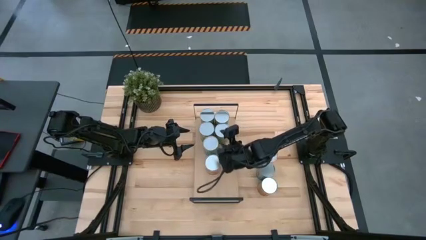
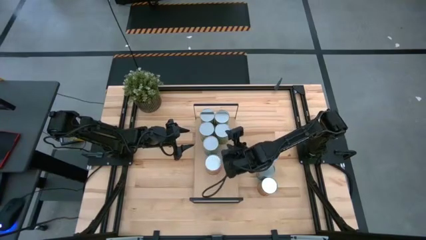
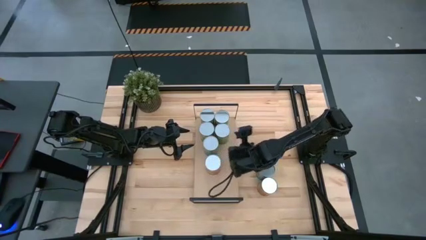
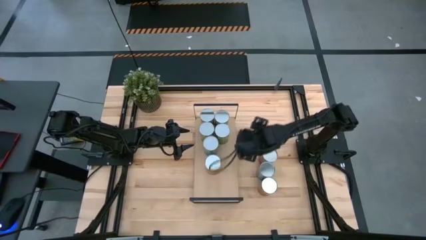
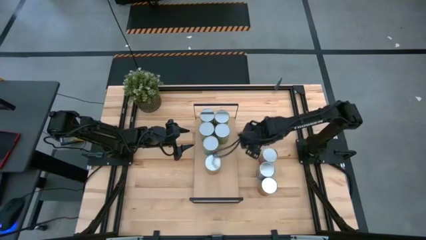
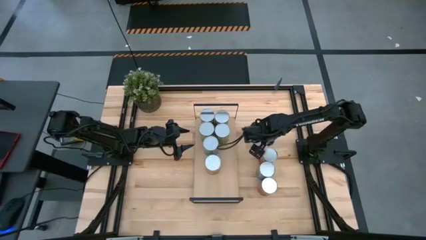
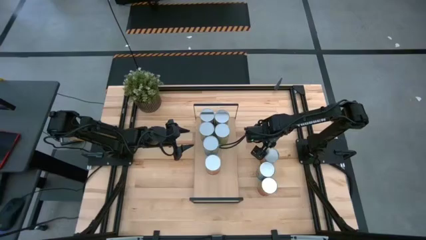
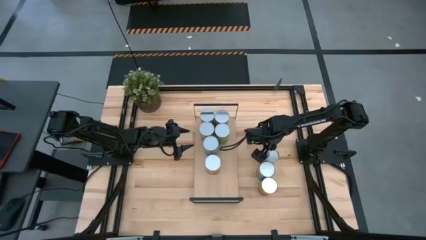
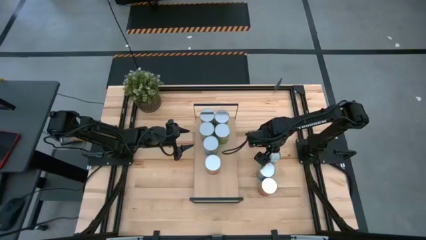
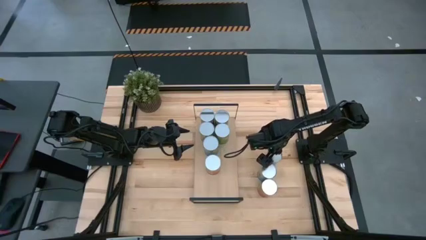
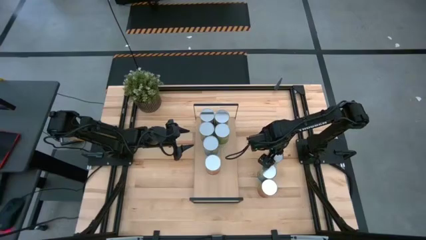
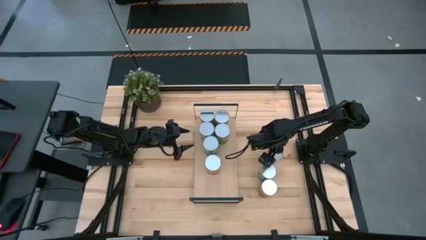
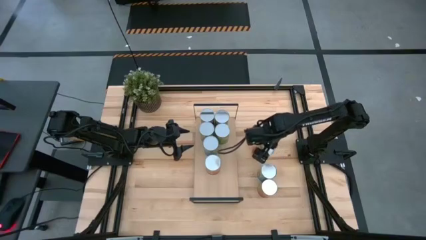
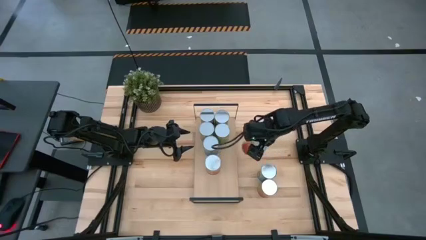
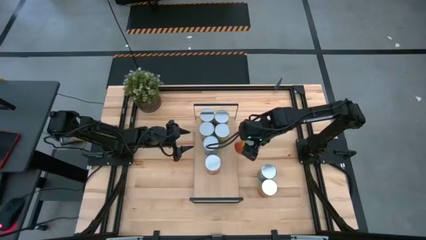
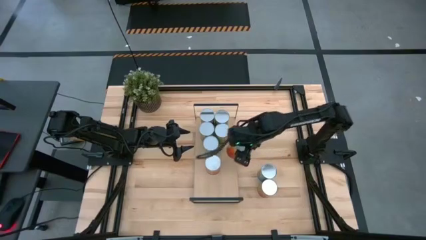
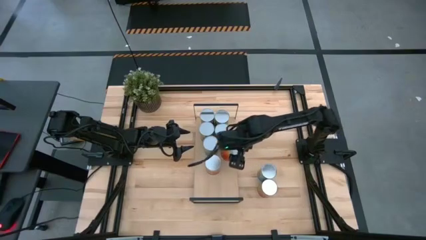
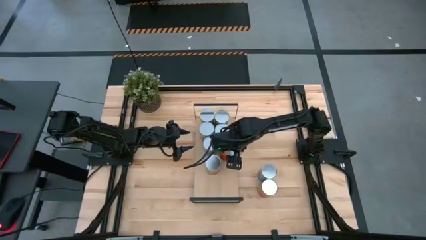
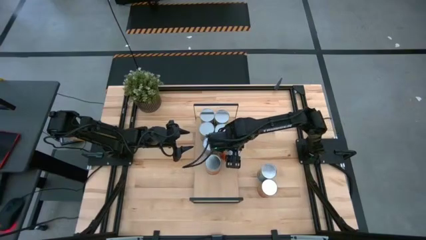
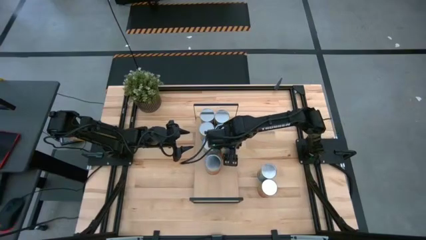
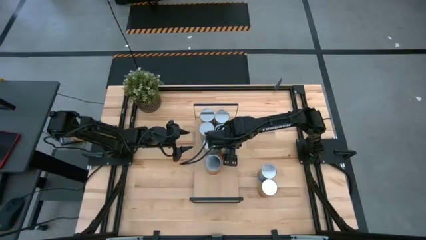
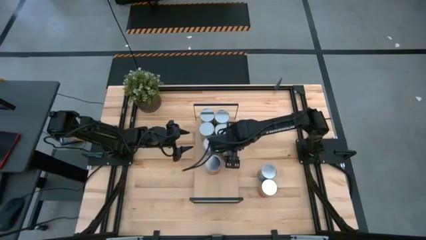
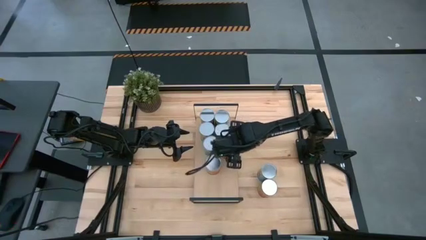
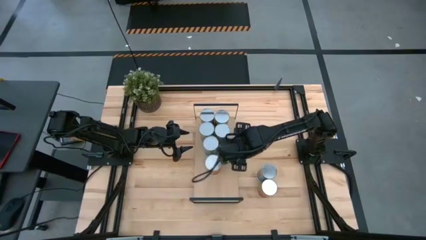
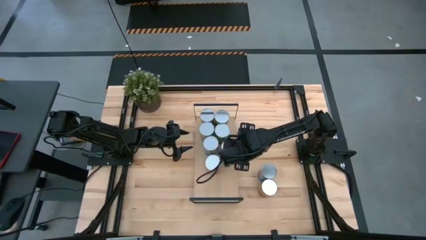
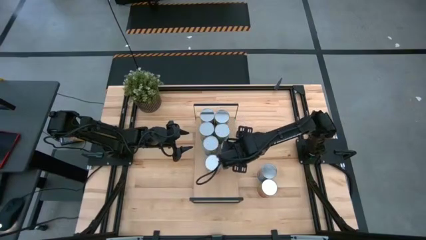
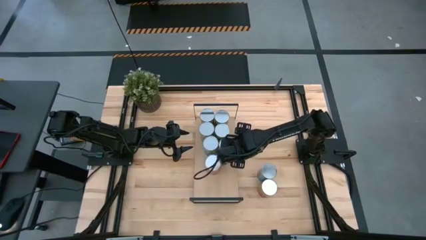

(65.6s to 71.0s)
Task: Pick and place cans onto a shelf
Put the top canned pineapple on the shelf

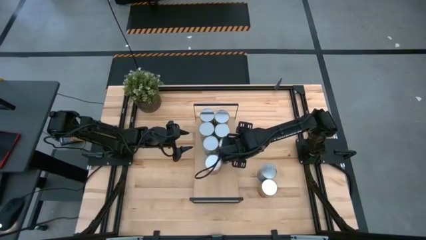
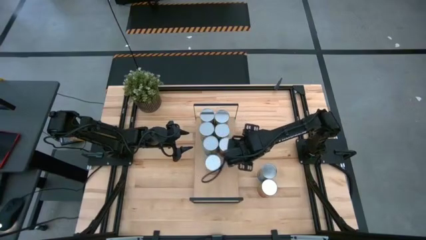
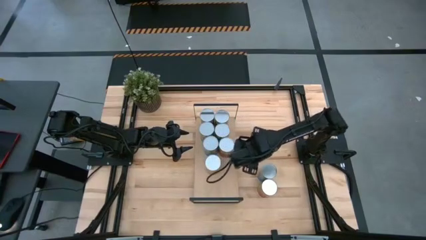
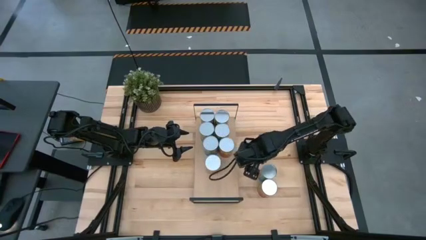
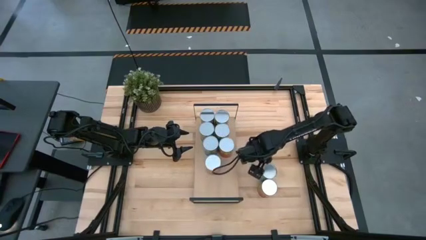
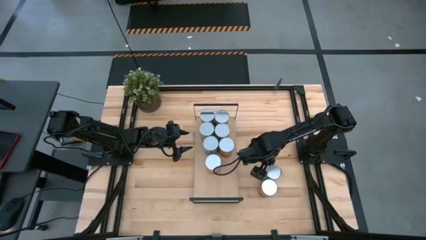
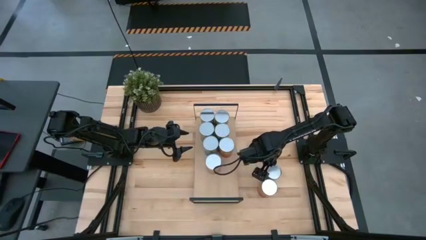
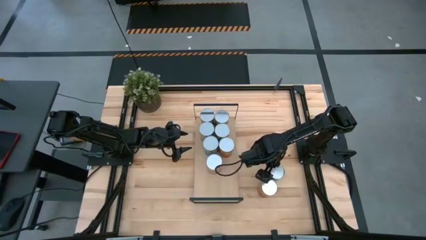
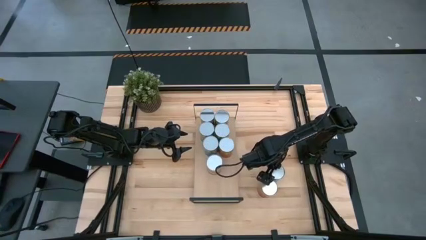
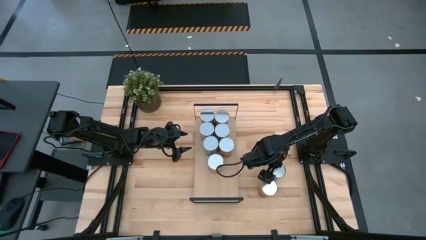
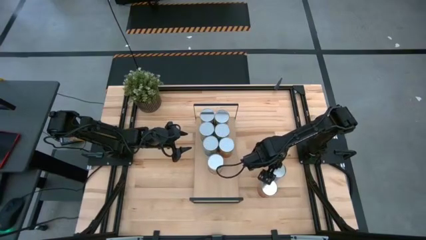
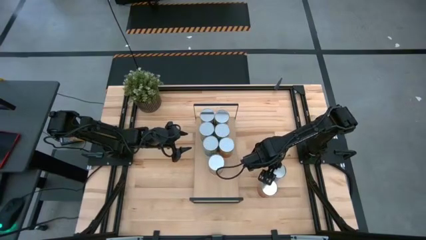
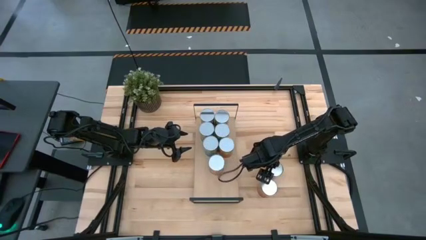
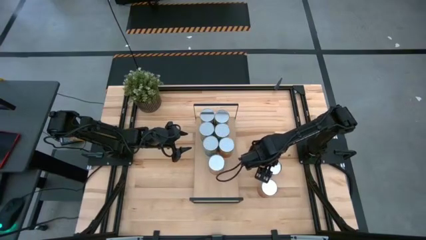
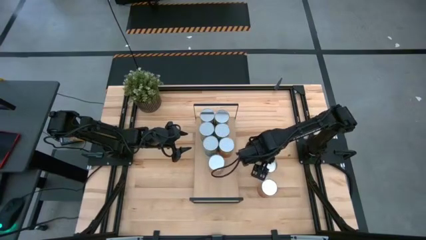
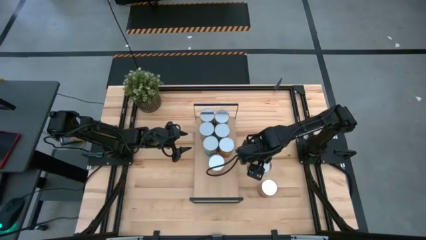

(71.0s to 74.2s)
Put the canned tomatoes on the shelf

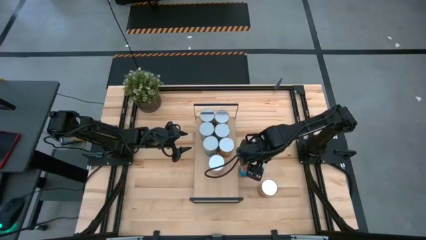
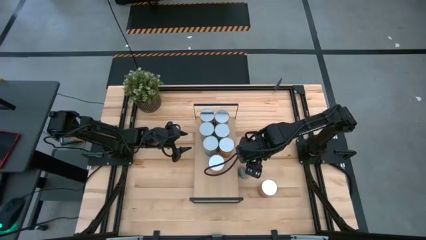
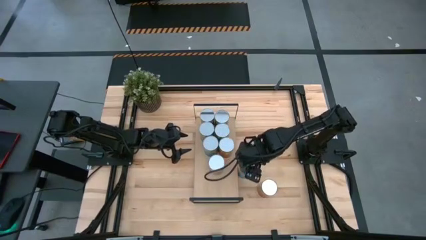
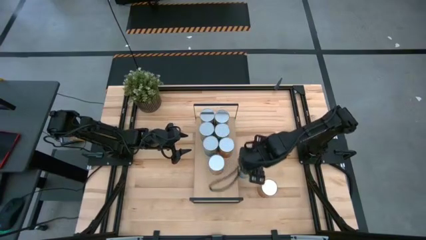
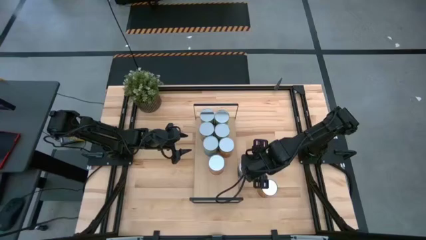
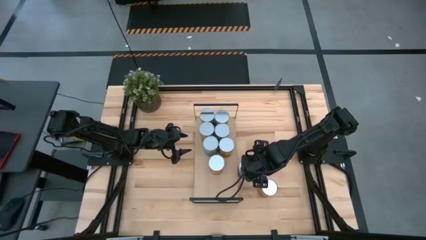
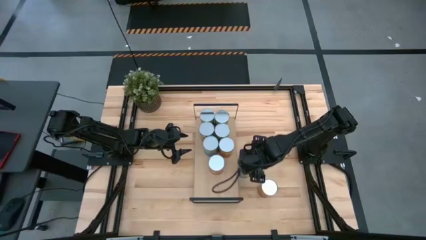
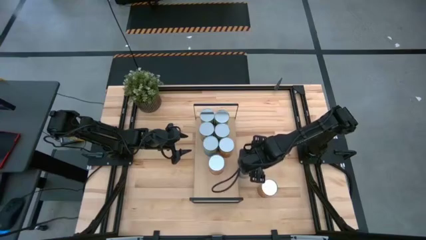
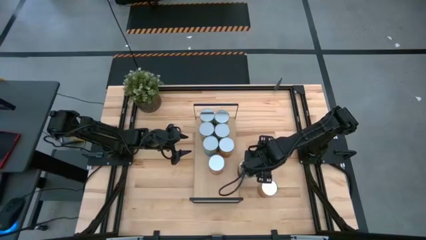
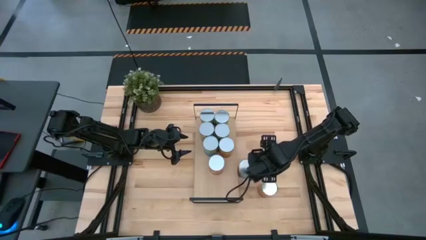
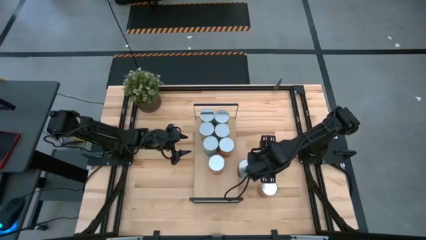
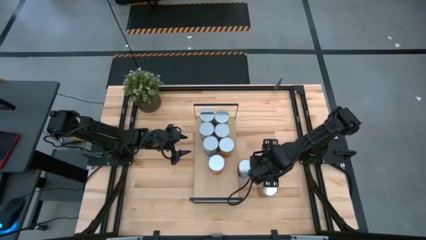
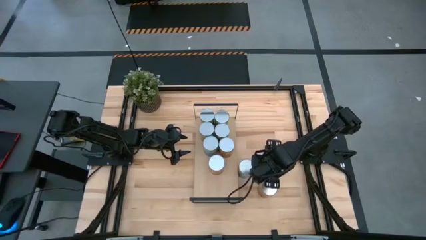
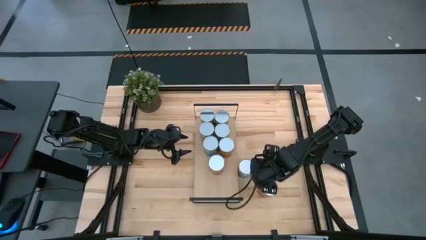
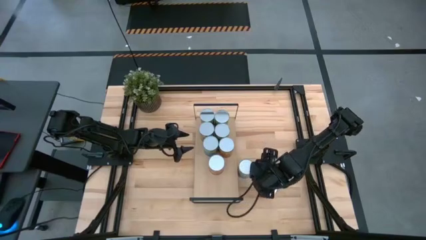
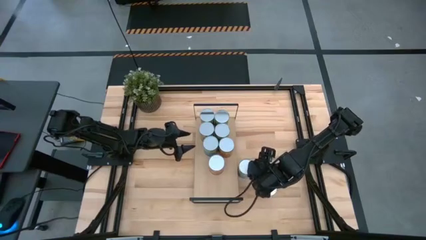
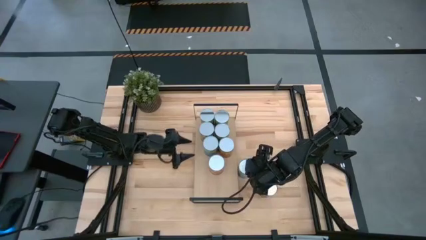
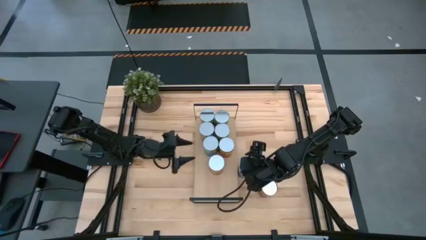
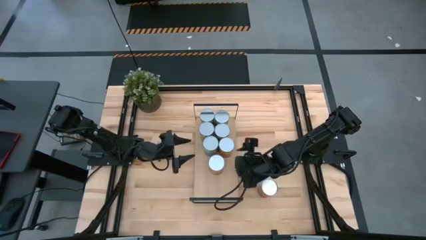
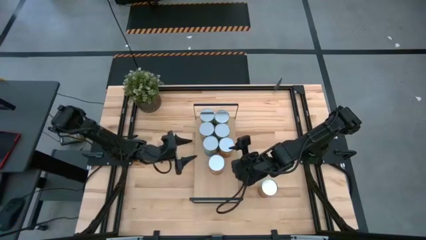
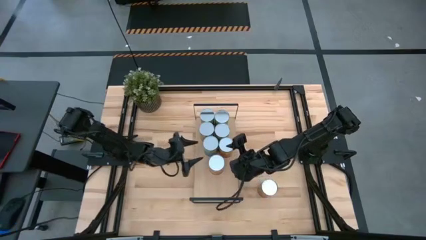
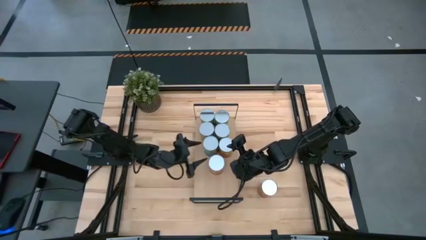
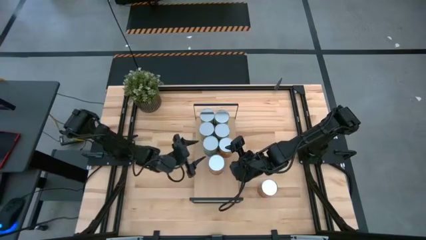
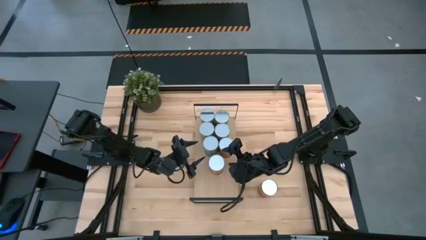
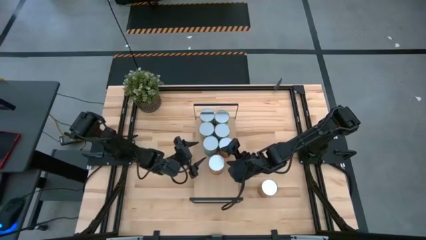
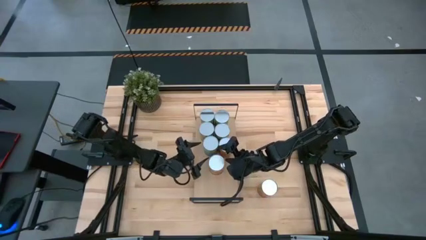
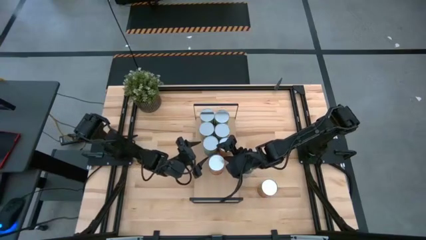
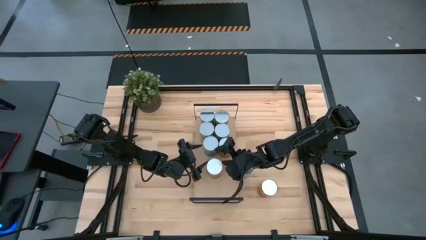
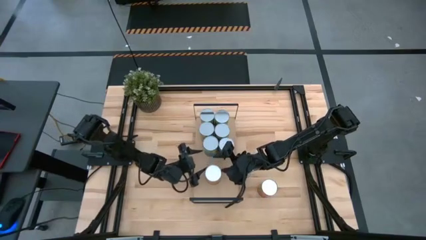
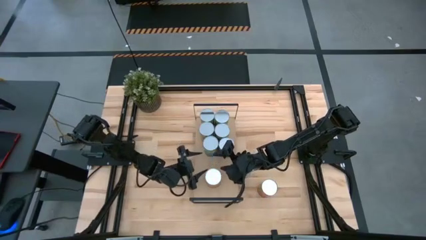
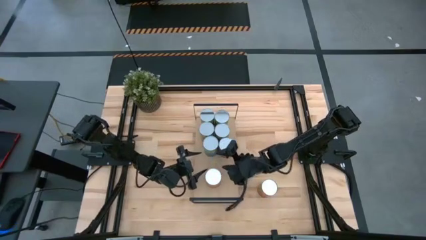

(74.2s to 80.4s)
Adjust the canned corn on the shelf

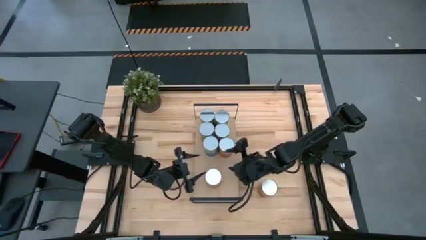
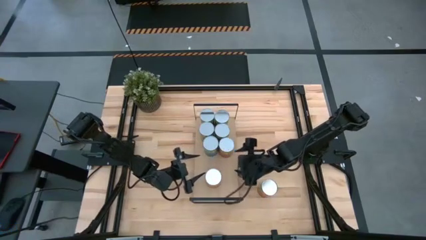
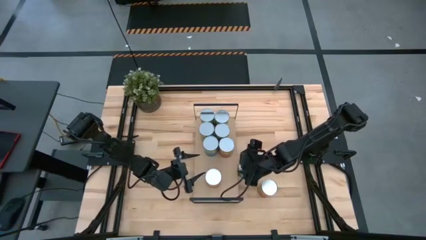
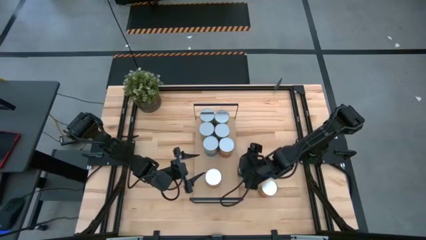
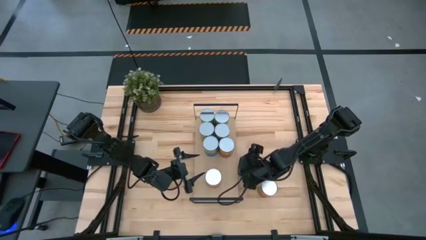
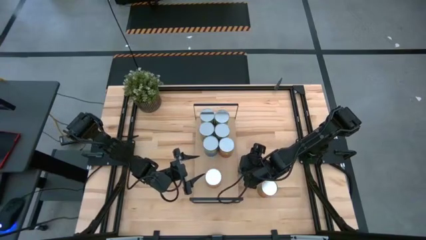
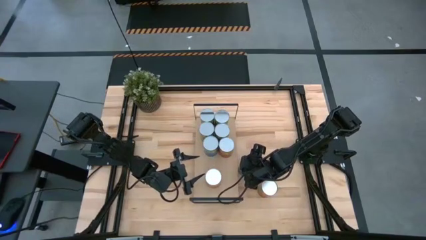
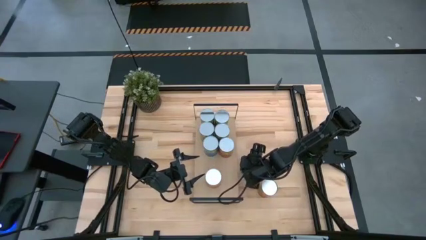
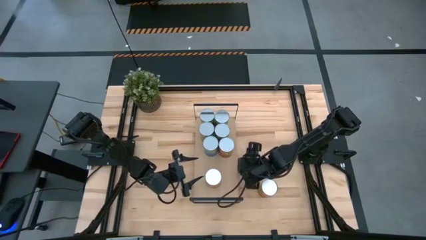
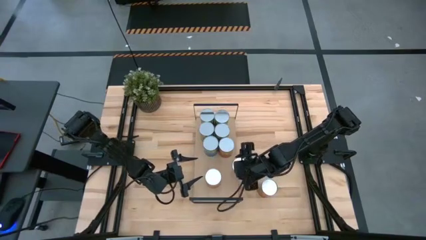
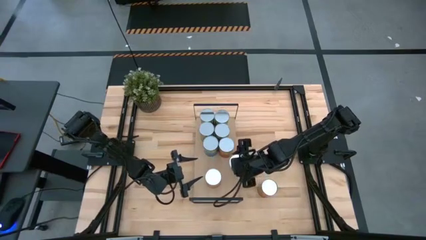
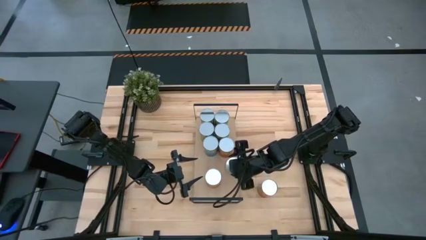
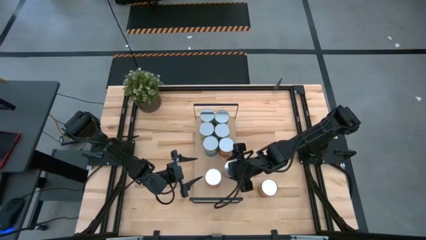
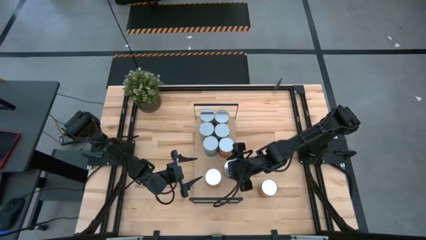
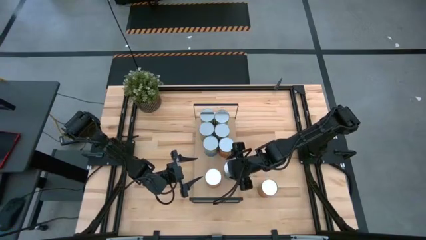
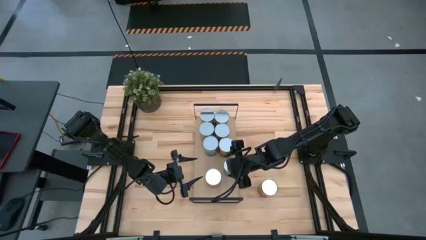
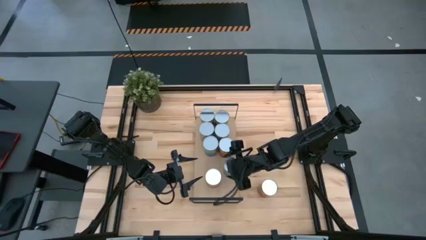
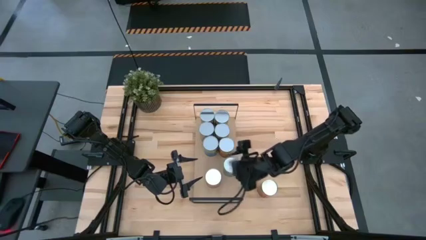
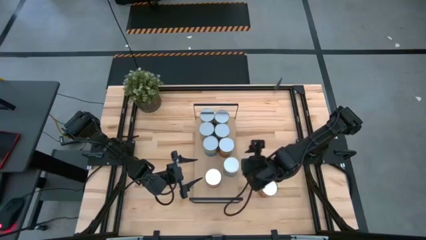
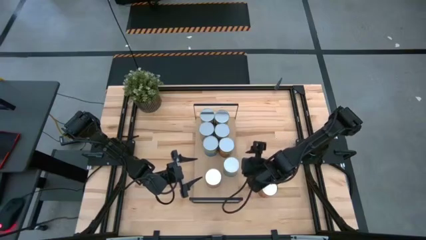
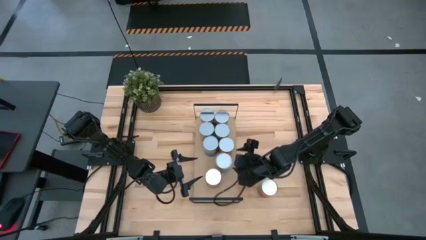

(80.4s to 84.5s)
Put the canned tomatoes on the shelf
